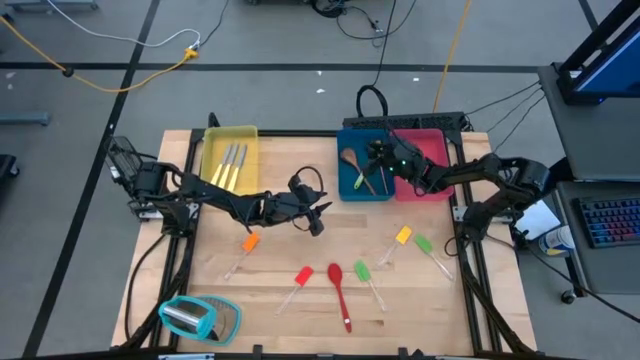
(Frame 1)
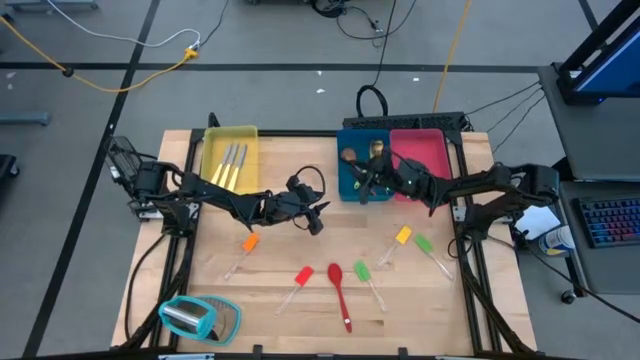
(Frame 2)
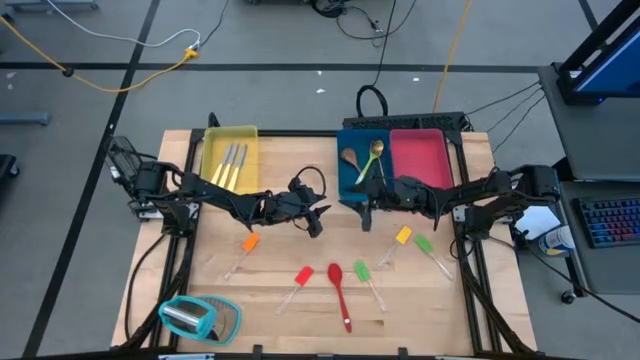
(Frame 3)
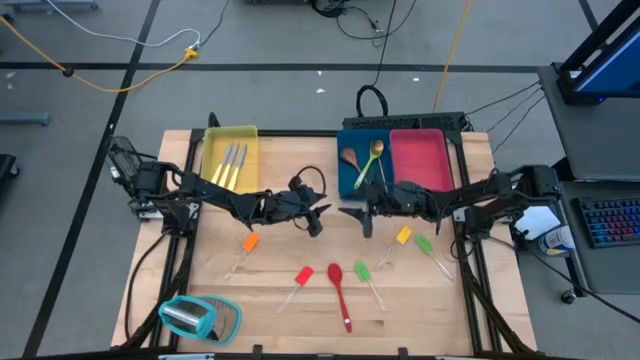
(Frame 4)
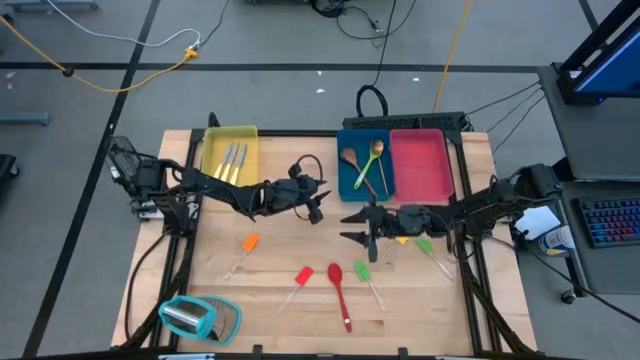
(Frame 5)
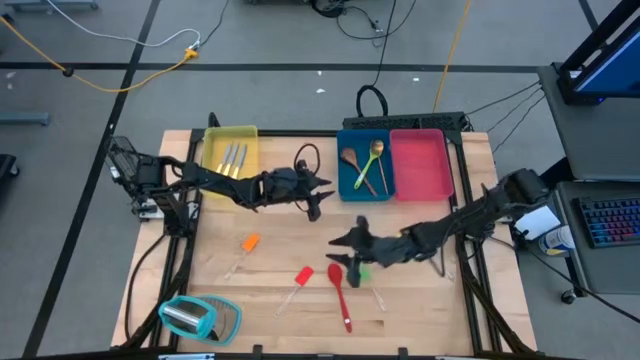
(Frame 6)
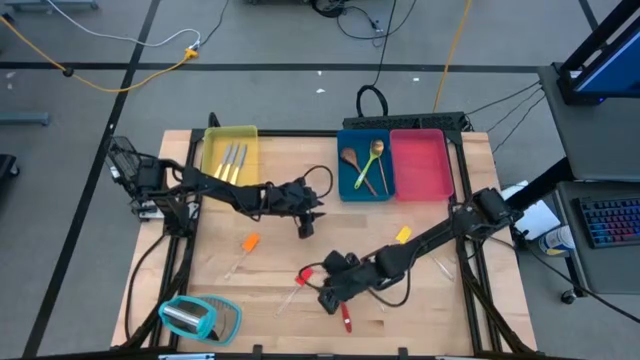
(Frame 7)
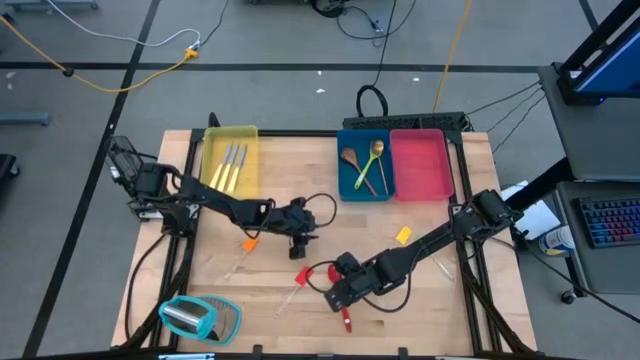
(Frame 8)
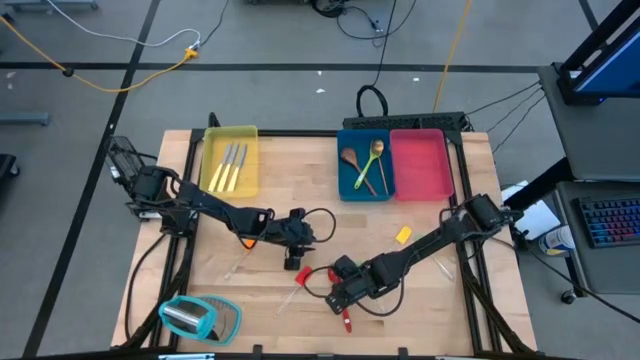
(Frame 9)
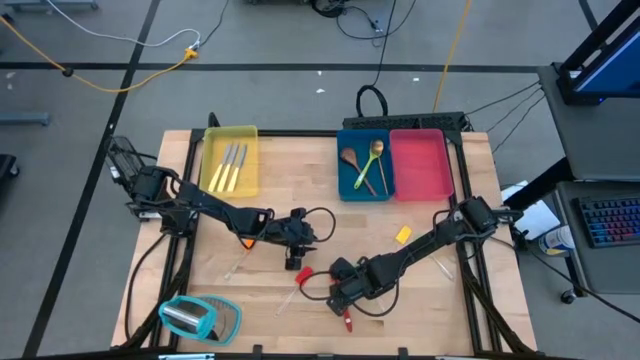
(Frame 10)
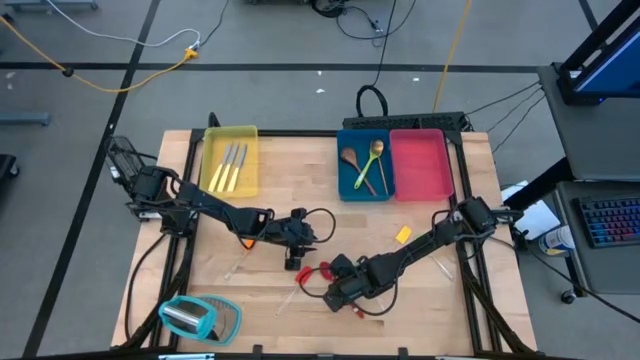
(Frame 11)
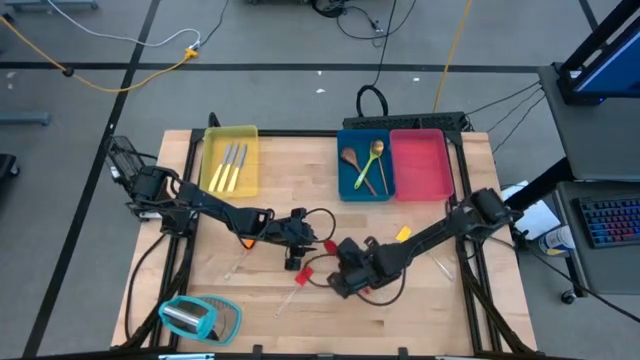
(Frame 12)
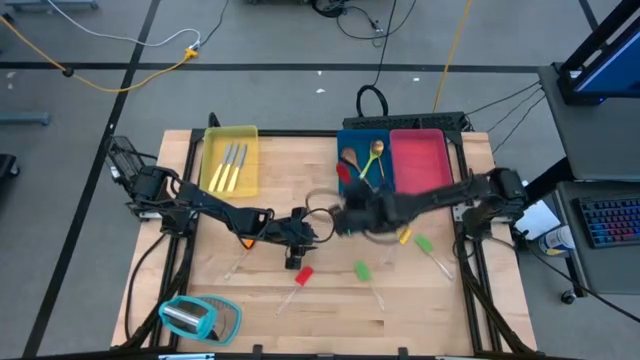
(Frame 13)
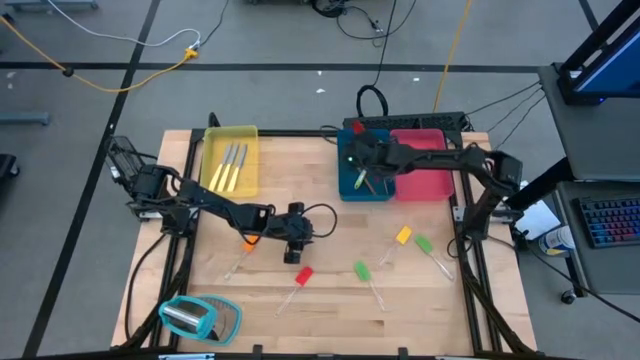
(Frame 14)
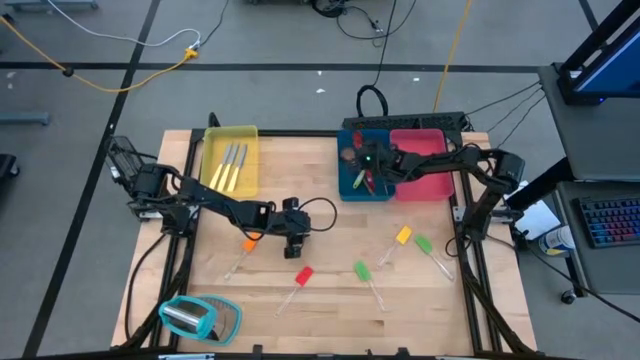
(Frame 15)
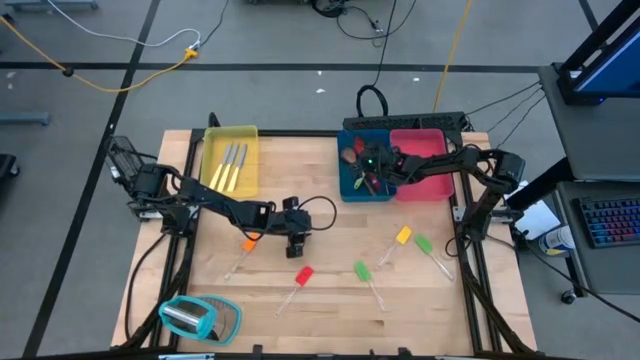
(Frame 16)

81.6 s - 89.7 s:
Task: Pick & Place Kitchen Items
Put the red serving spoon into the blue bin

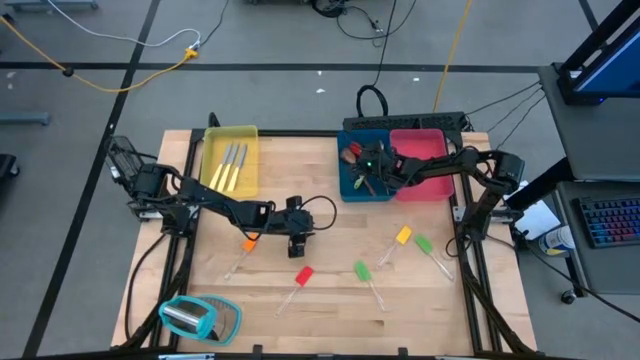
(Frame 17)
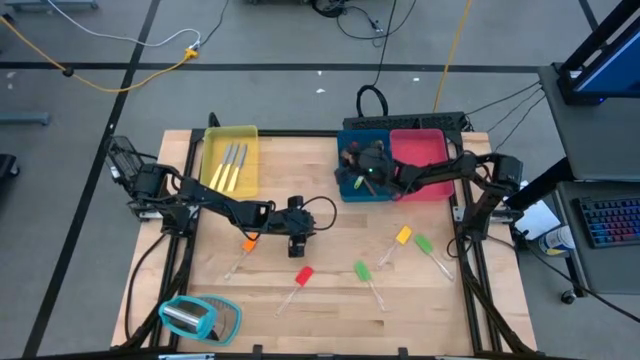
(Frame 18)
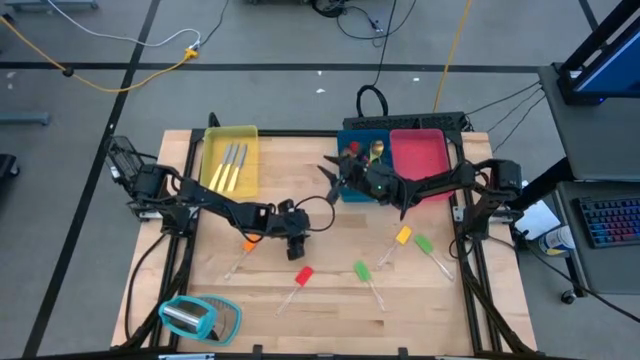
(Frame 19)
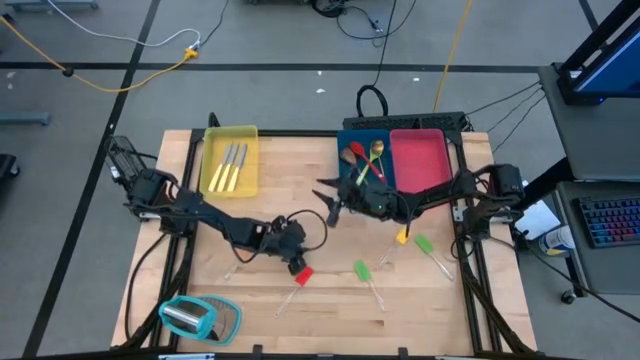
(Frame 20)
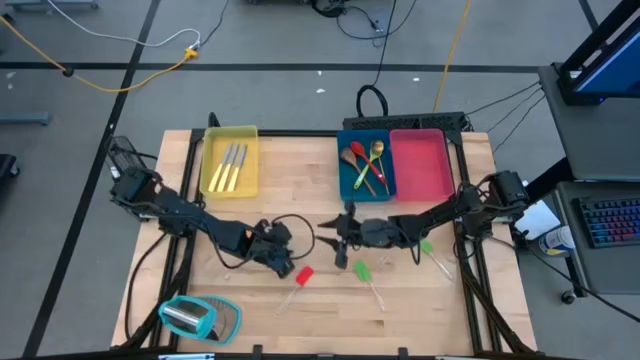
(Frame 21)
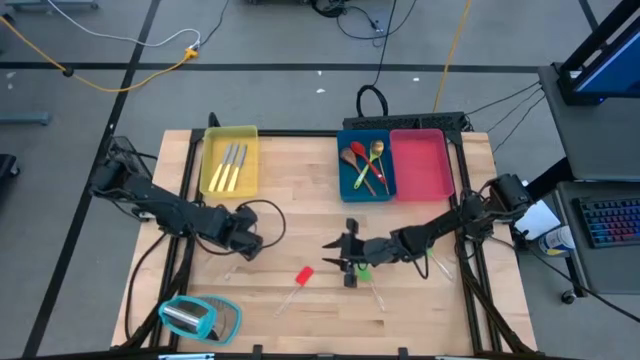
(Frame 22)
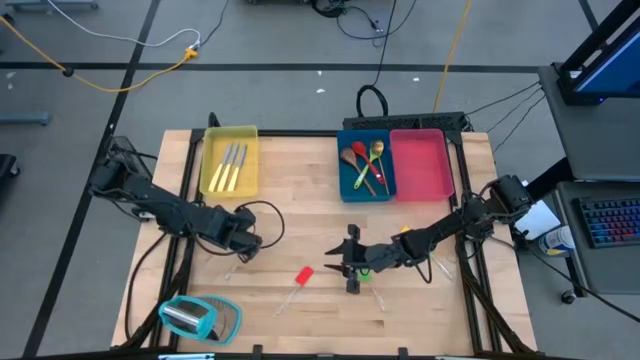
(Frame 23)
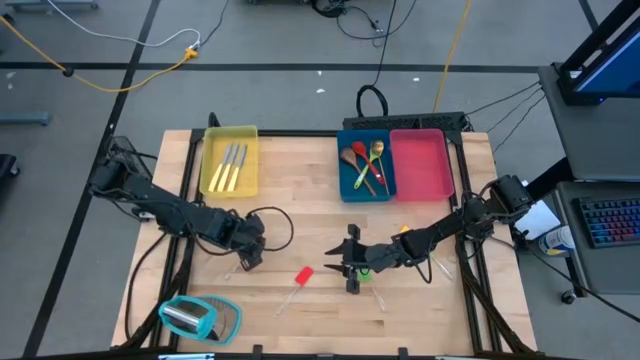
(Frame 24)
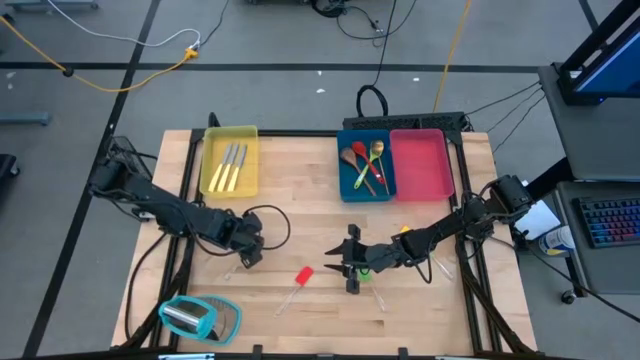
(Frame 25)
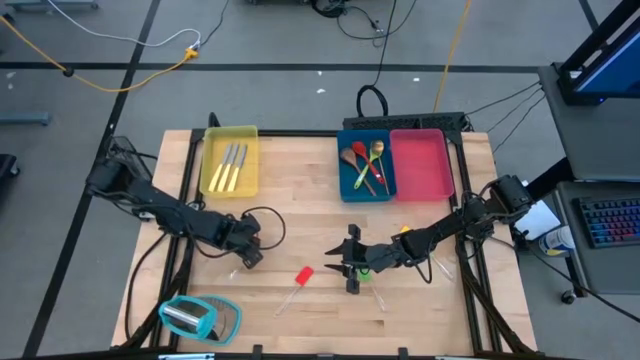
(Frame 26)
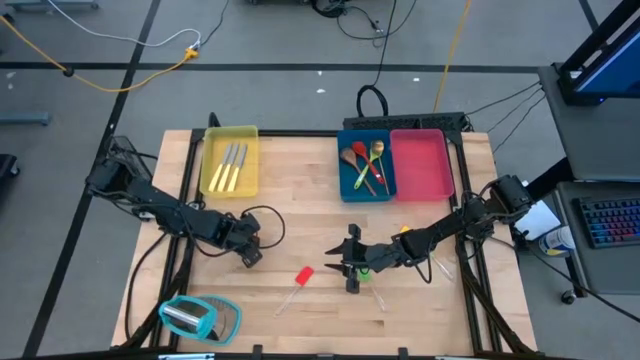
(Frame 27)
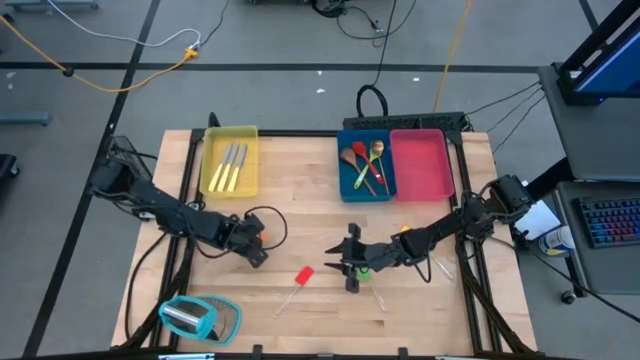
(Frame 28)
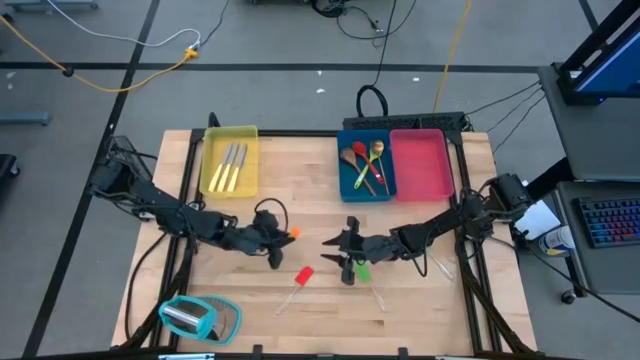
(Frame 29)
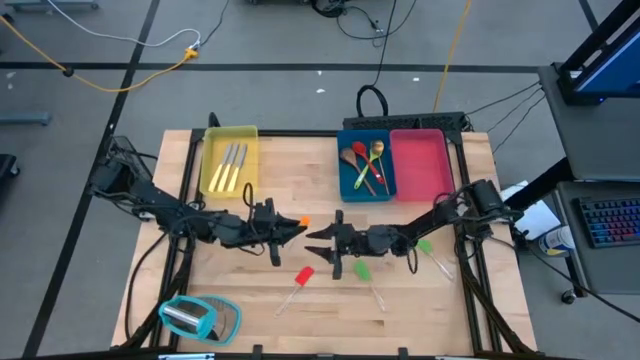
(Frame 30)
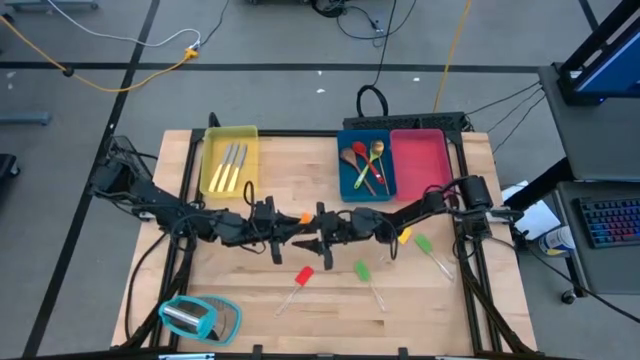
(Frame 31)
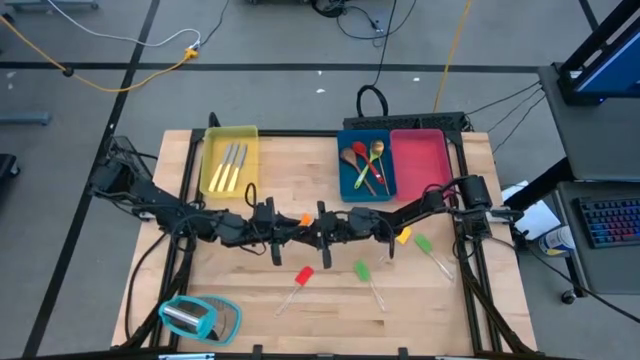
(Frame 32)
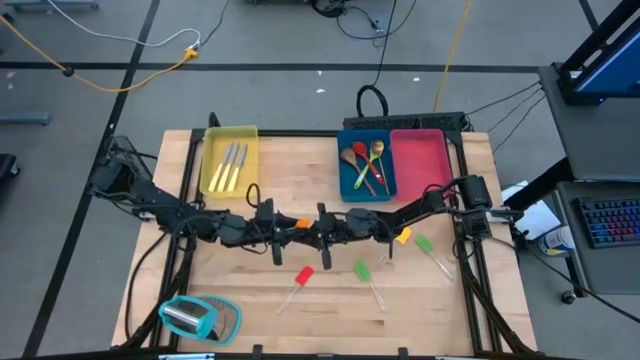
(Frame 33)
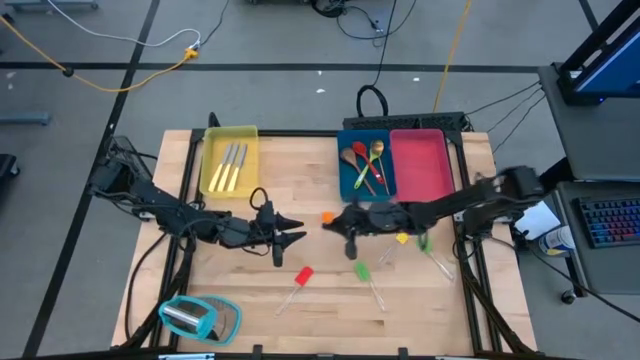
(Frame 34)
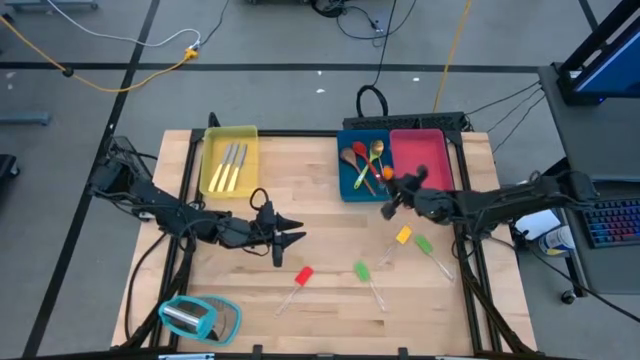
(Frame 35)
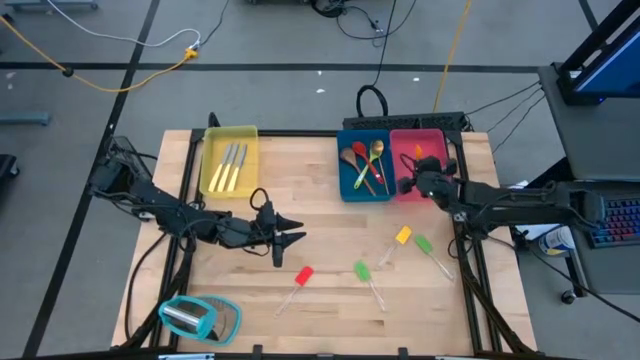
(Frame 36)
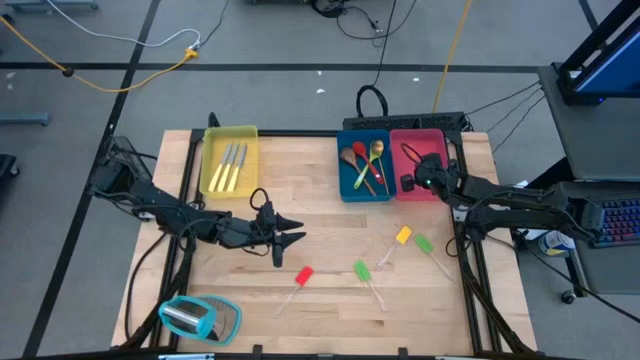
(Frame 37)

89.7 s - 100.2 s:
Put the orange spatula into the pink bin

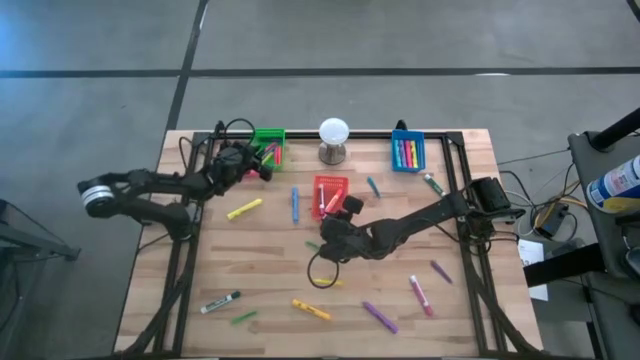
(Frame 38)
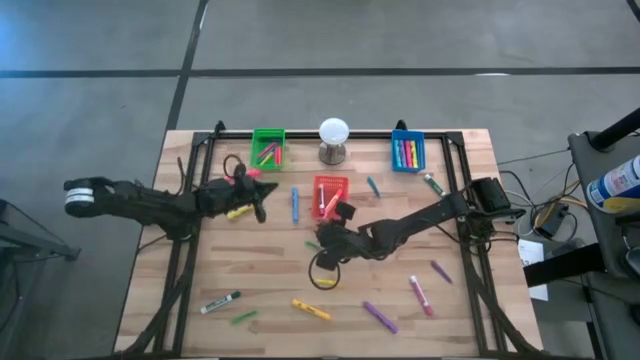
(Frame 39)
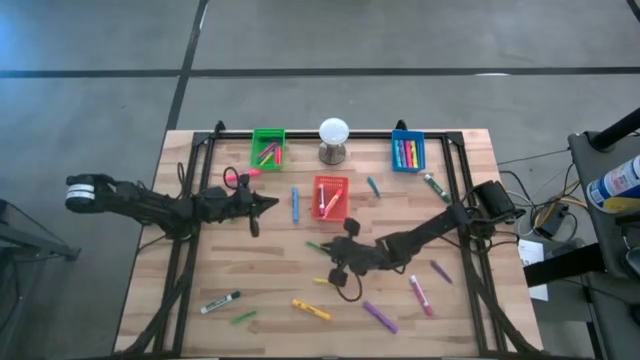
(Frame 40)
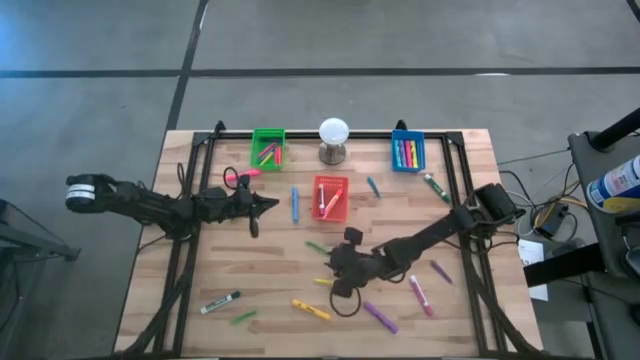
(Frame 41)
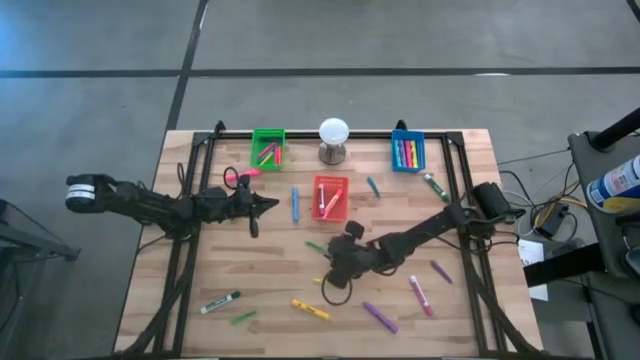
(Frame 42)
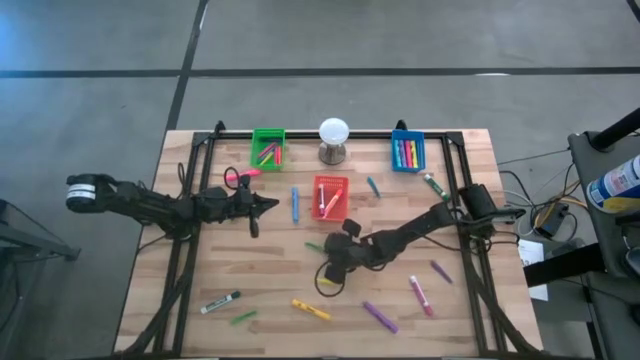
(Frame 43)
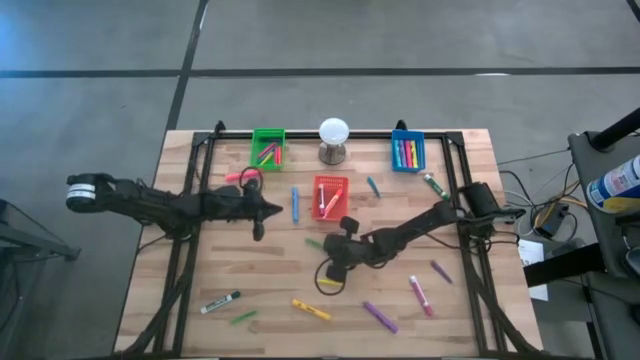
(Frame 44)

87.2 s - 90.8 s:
Task: Pick & Place Markers
Put the top green pen into the green bin
